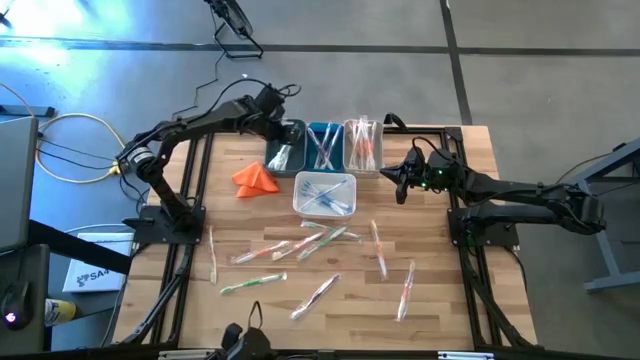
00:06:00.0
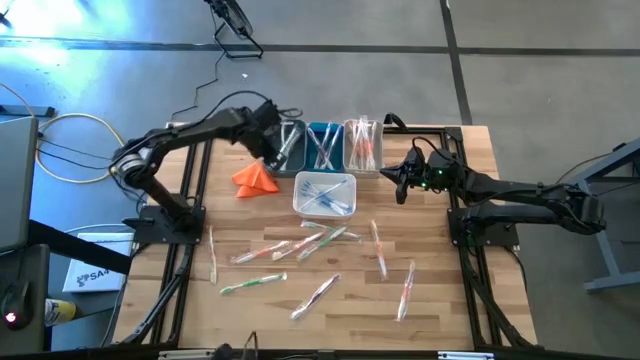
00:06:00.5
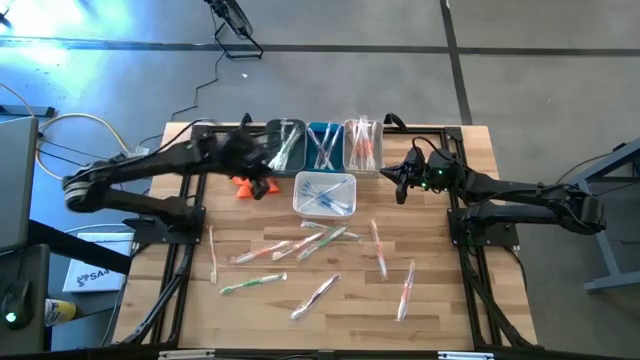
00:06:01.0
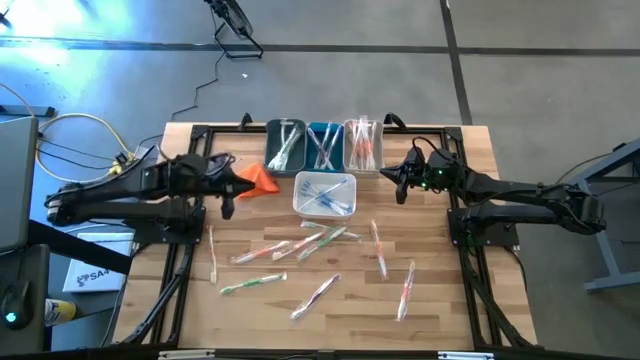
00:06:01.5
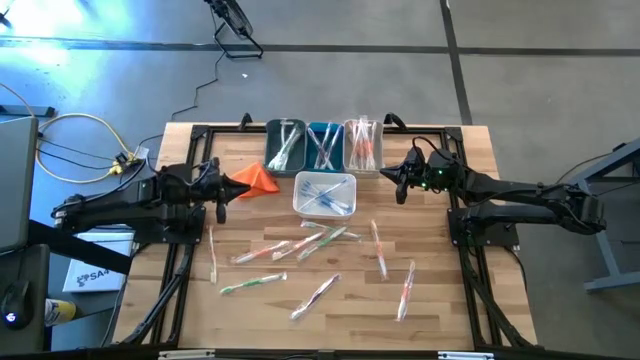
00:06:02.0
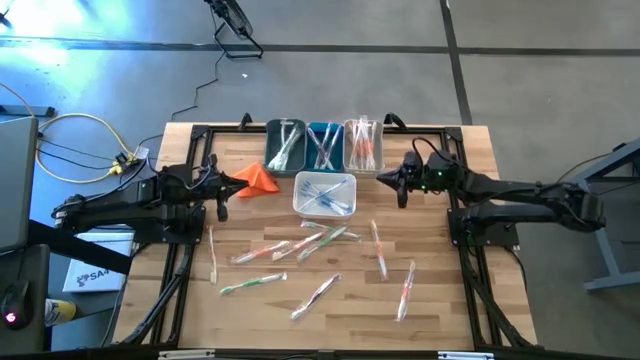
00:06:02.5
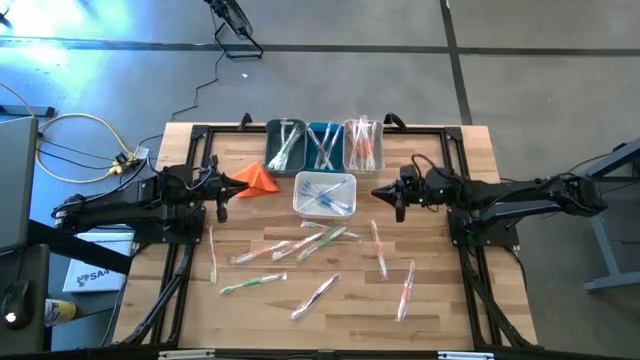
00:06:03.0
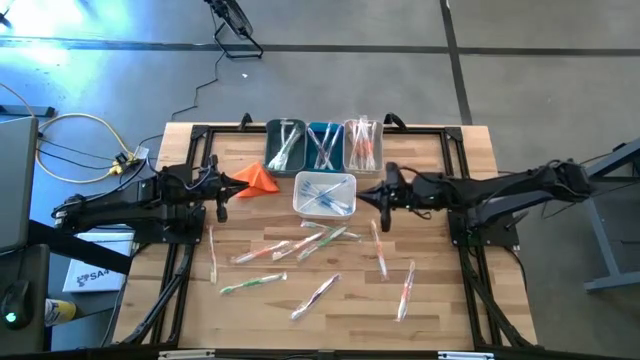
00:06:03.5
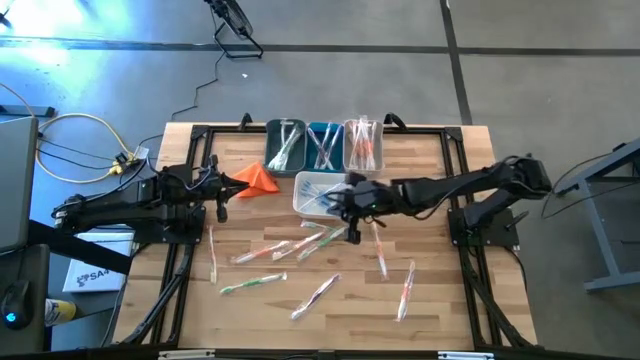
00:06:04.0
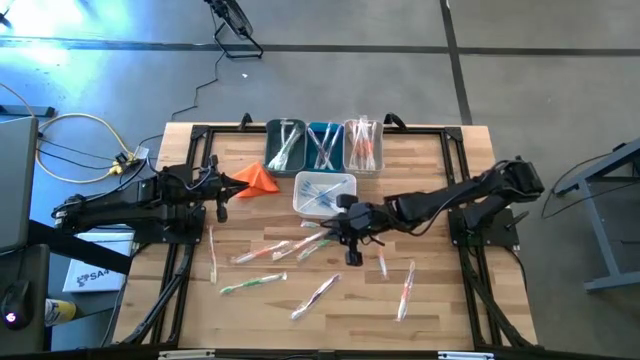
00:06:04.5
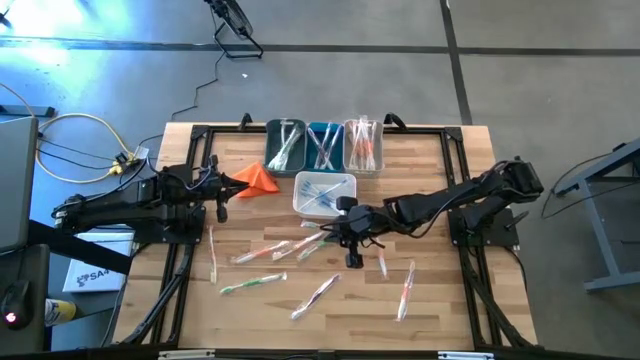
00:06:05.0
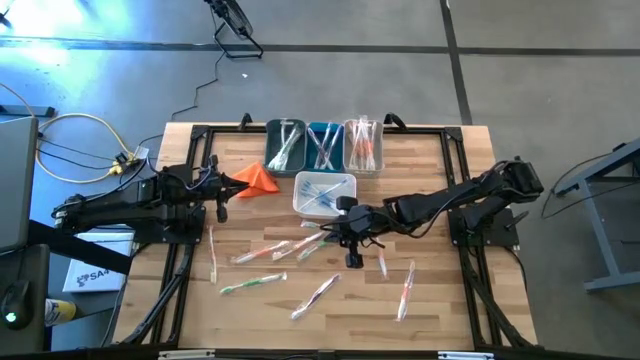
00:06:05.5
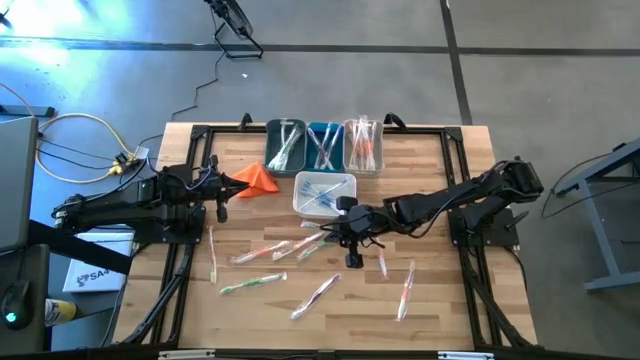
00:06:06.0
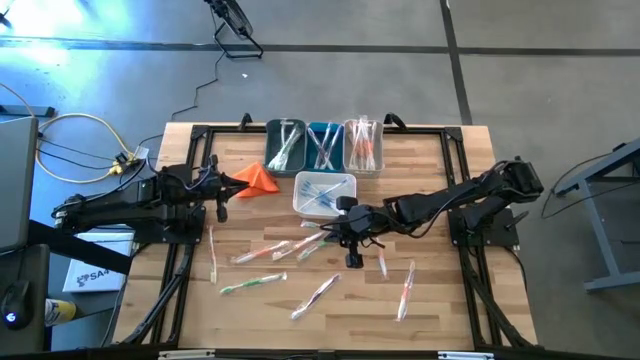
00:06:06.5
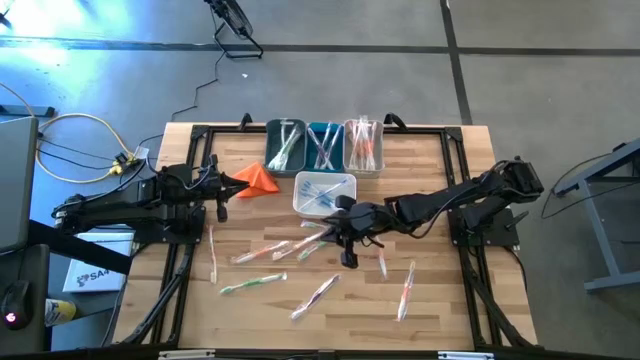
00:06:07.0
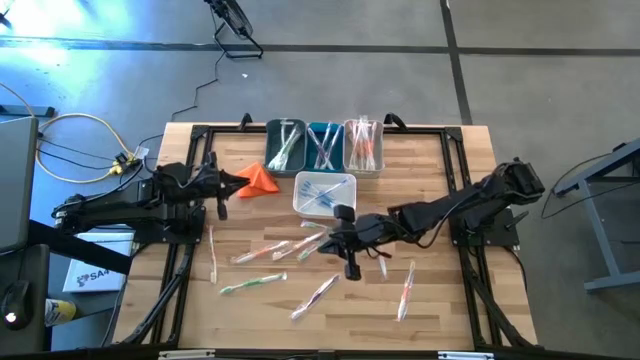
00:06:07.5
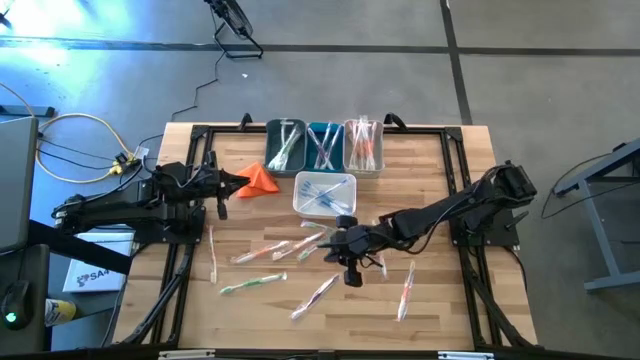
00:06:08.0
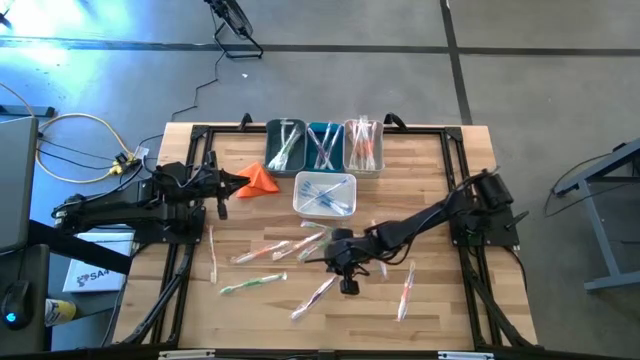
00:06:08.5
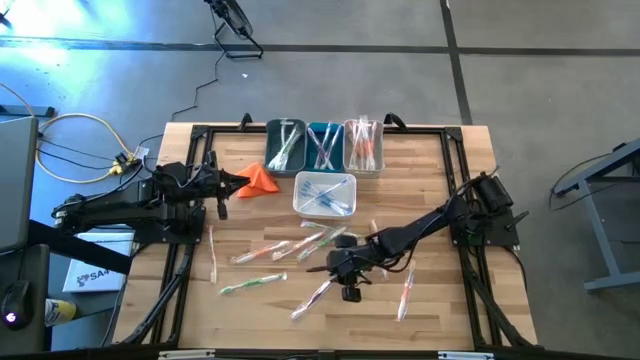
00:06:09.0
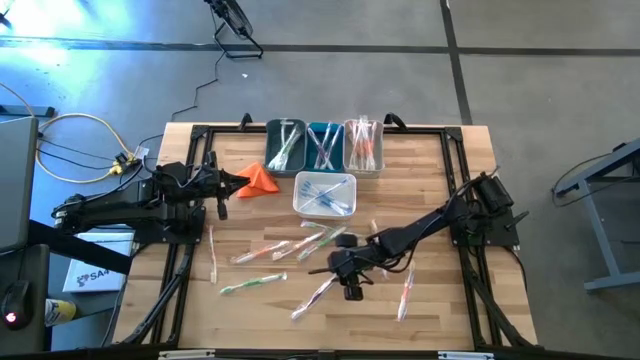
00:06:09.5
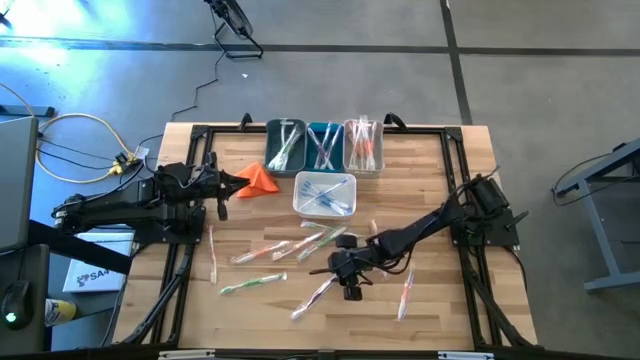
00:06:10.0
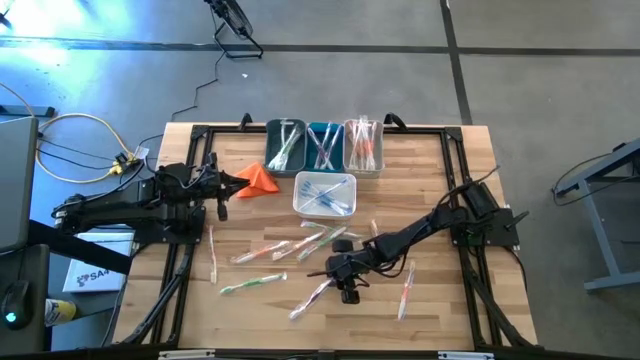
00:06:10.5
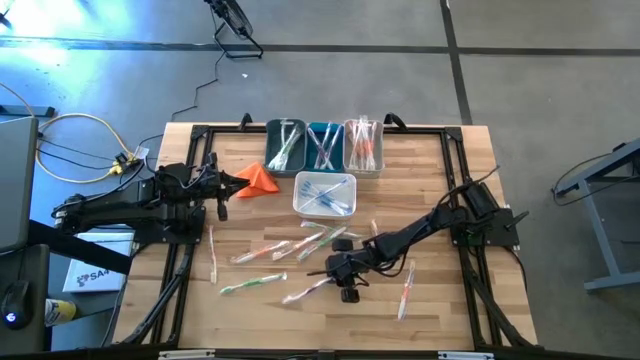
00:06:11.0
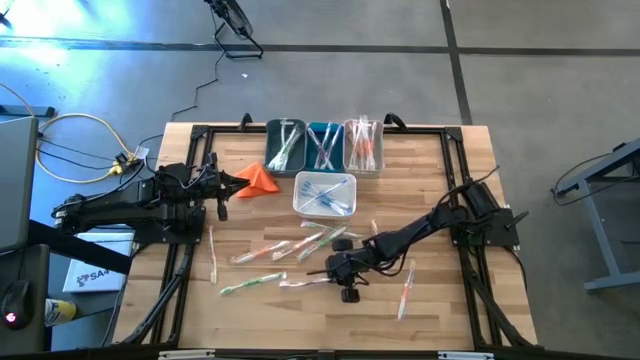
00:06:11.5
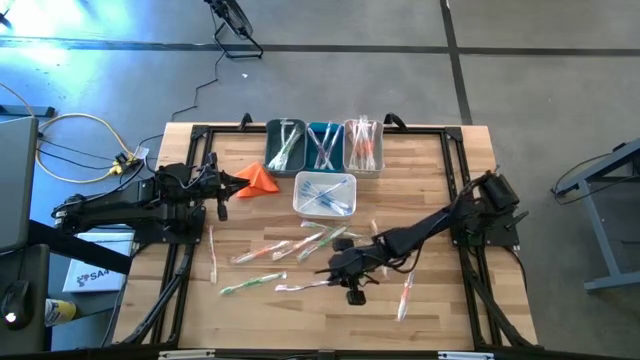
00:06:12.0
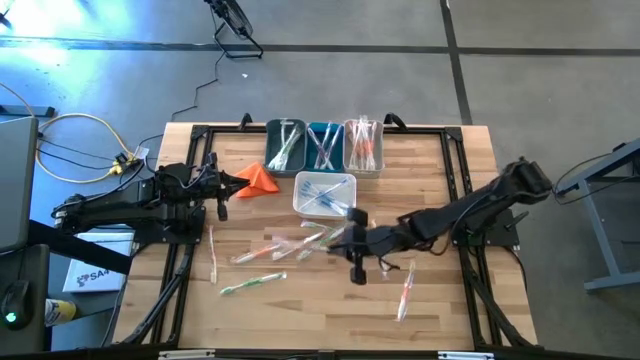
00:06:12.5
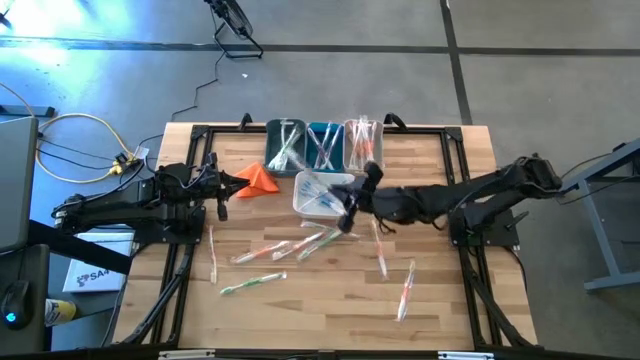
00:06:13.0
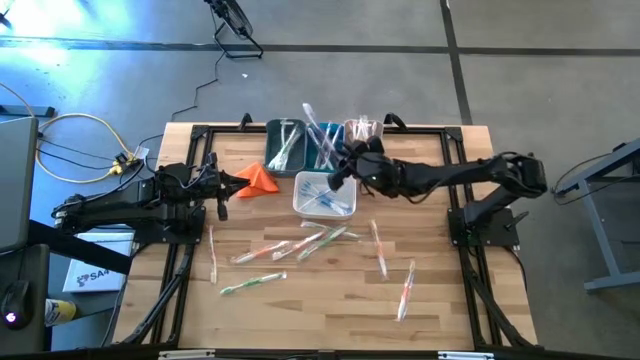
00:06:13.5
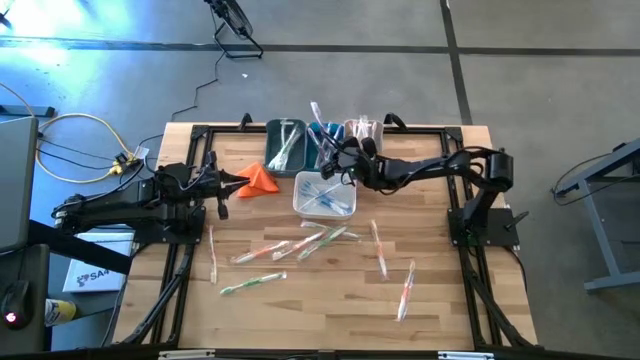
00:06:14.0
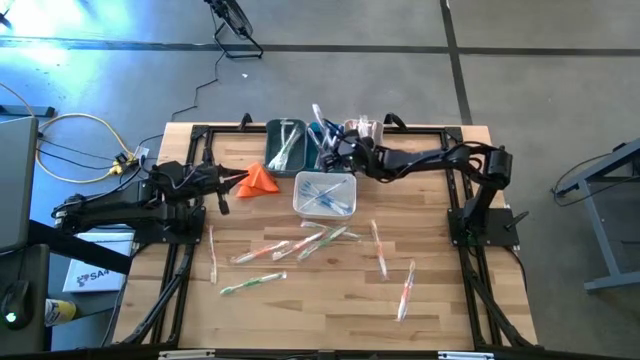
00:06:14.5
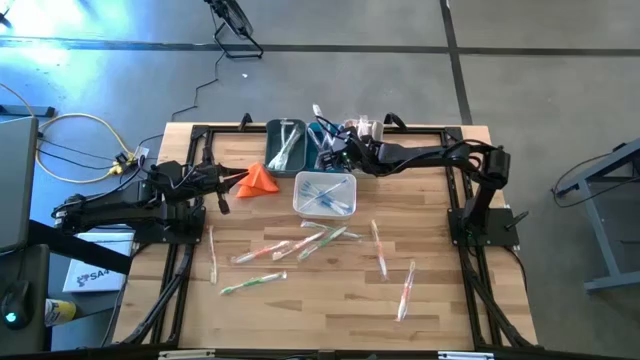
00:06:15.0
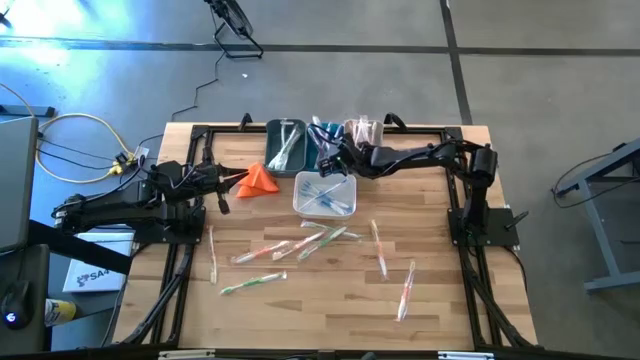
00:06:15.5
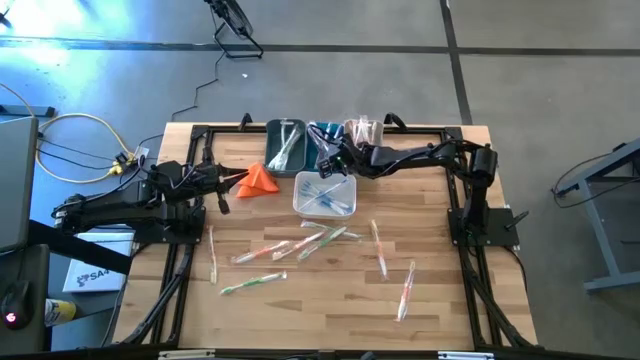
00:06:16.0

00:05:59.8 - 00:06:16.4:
Task: Pick & Place Toothbrushes
Put the purple toothbrush into the blue bin

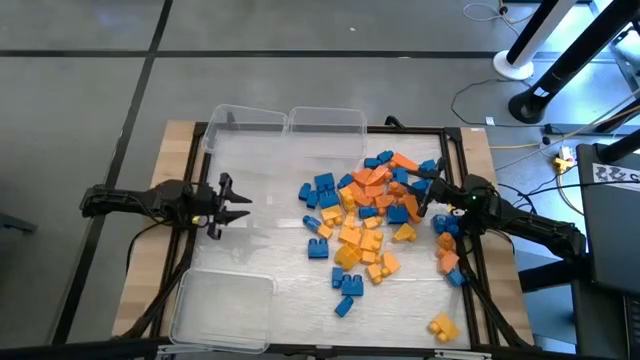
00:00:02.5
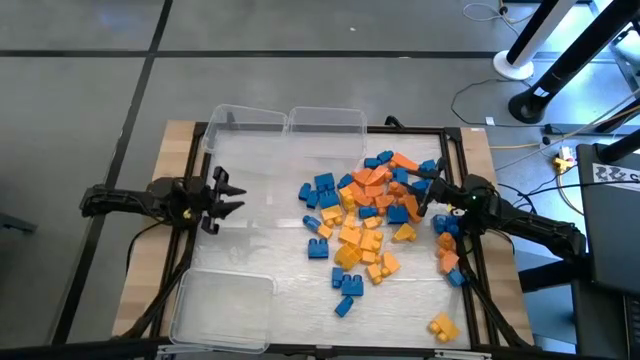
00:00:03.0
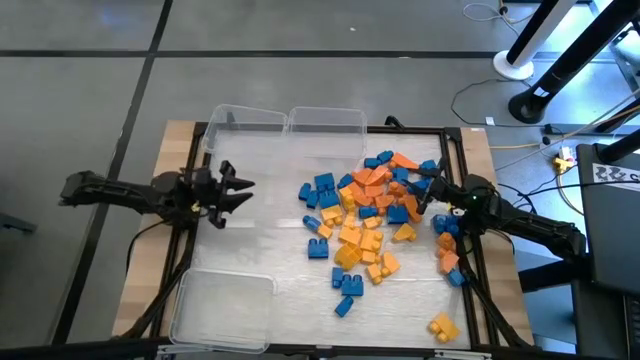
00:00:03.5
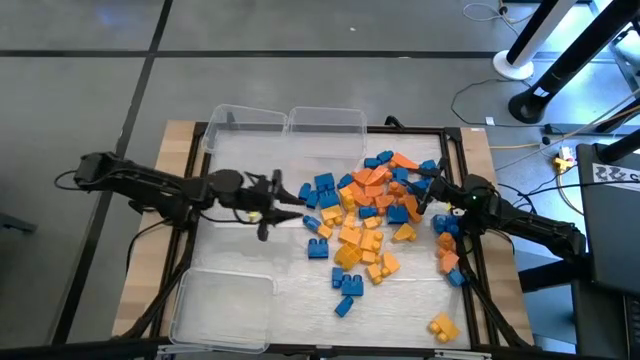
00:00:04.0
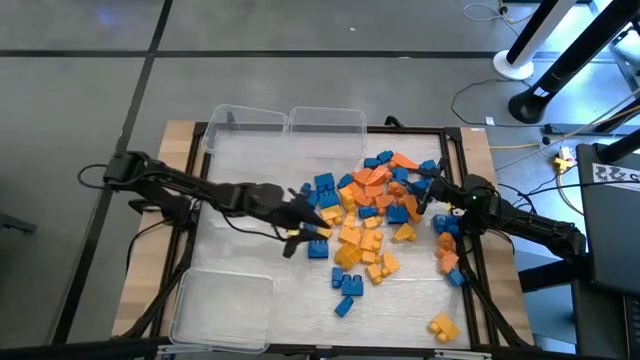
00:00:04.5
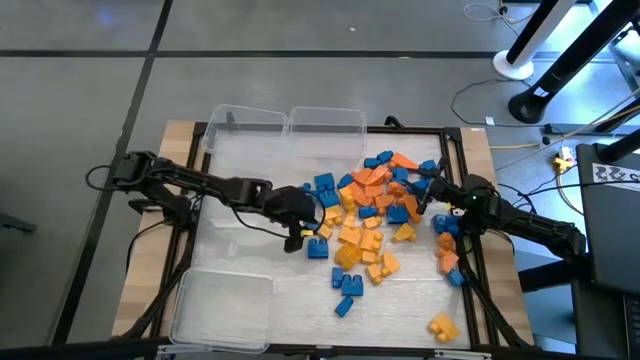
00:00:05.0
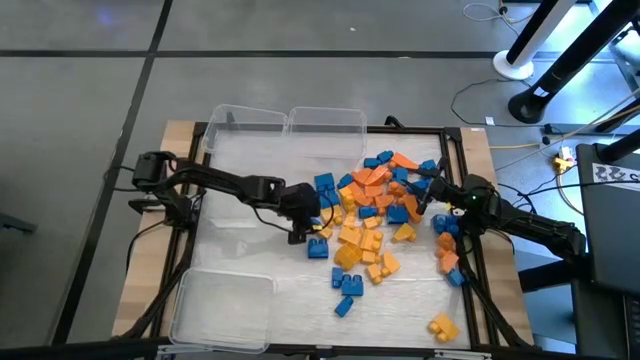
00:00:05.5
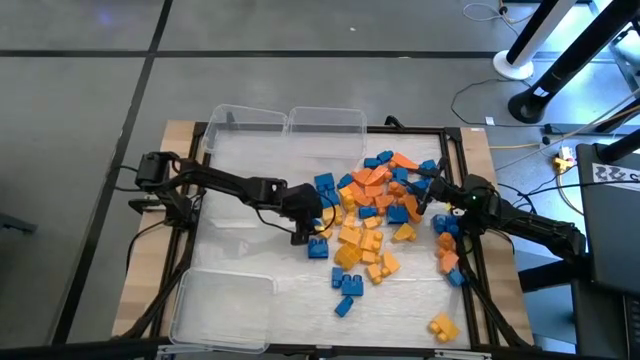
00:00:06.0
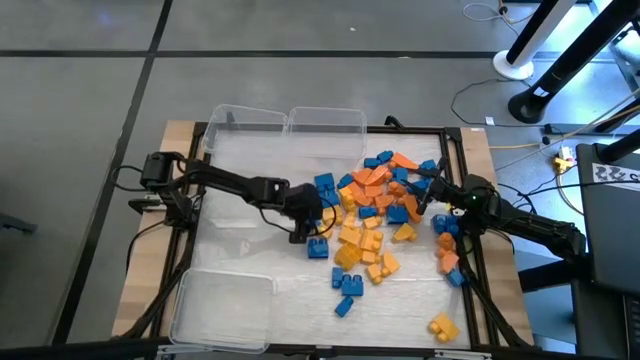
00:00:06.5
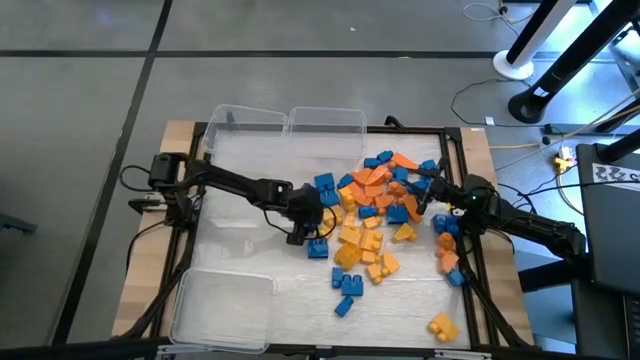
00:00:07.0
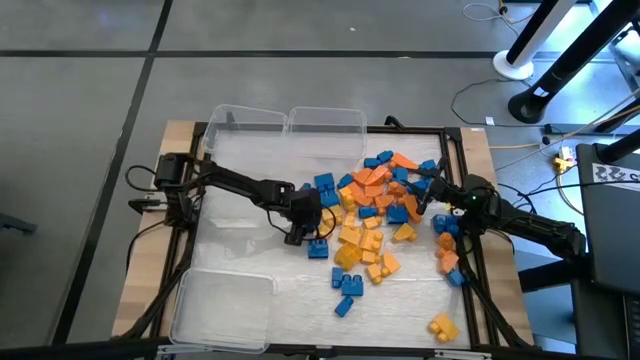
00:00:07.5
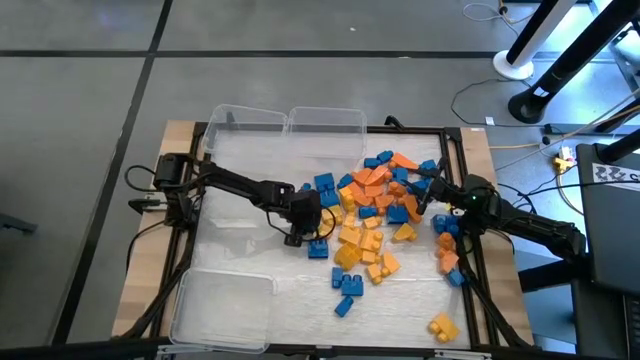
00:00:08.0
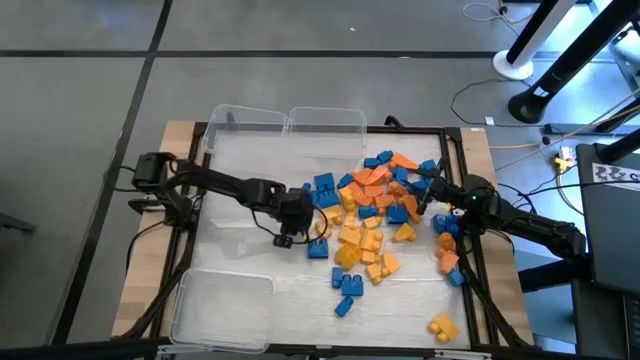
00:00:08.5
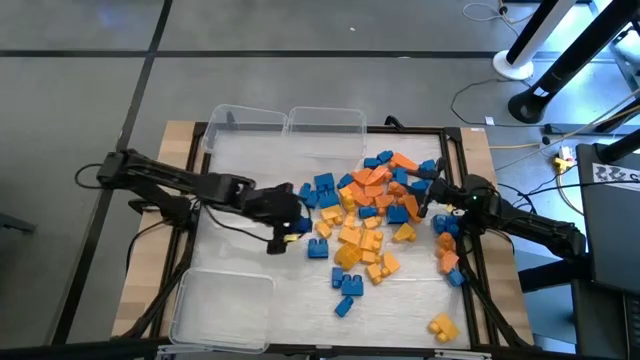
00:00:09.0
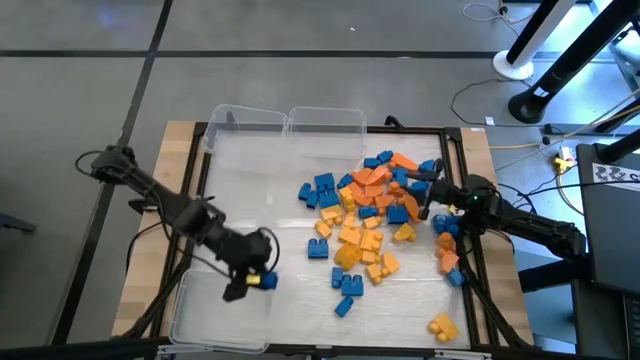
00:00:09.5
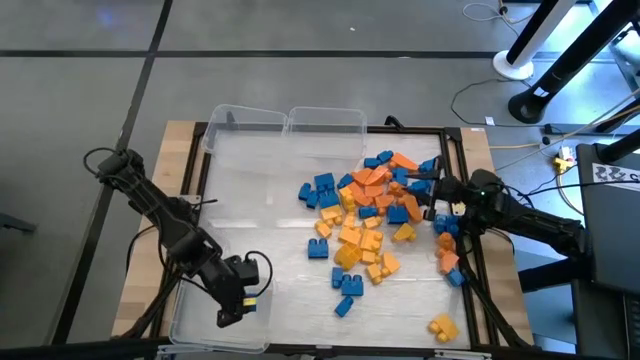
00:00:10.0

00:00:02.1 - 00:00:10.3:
Task: Sort blocks
Put the blue game piece into the bottom transparent bin
